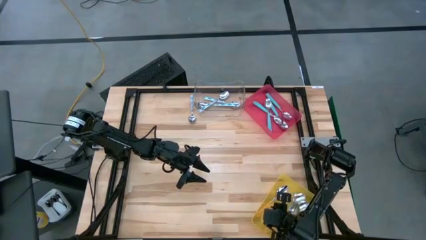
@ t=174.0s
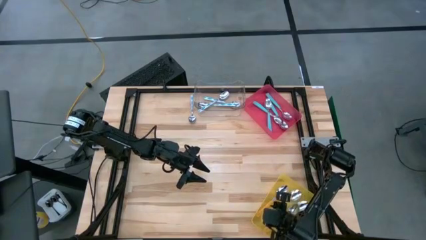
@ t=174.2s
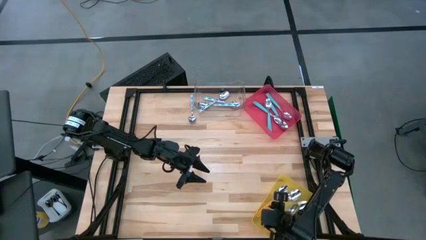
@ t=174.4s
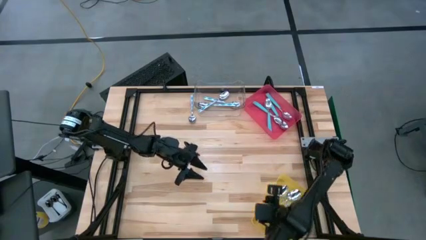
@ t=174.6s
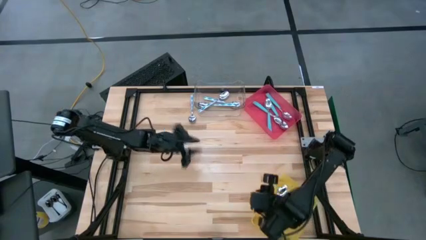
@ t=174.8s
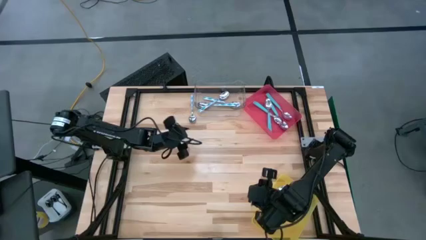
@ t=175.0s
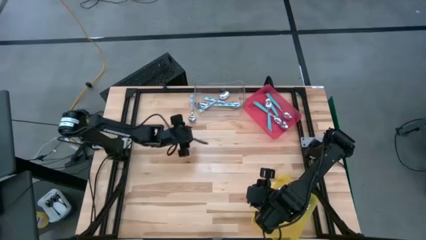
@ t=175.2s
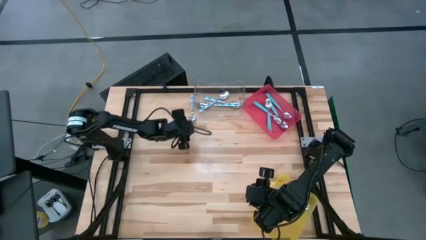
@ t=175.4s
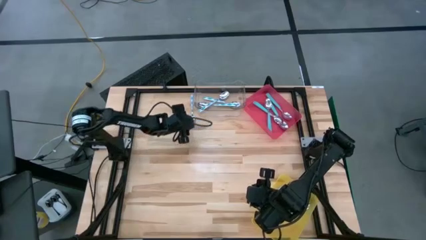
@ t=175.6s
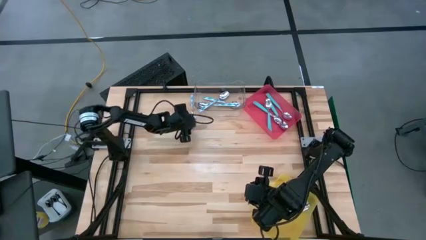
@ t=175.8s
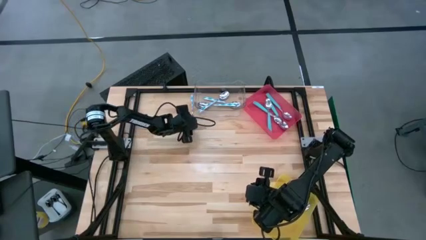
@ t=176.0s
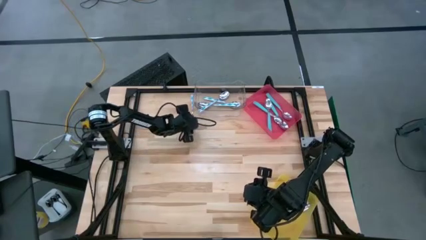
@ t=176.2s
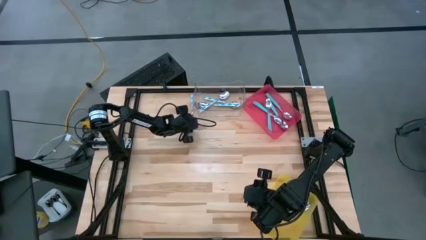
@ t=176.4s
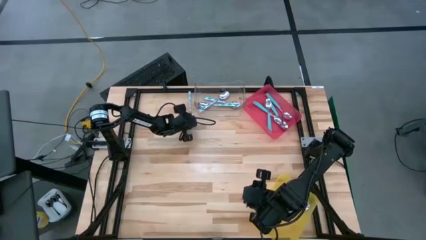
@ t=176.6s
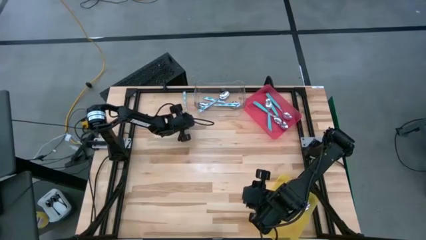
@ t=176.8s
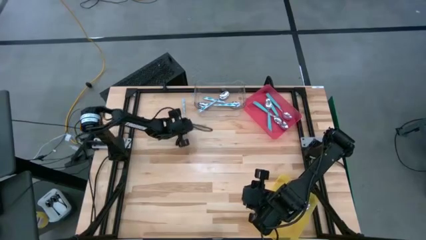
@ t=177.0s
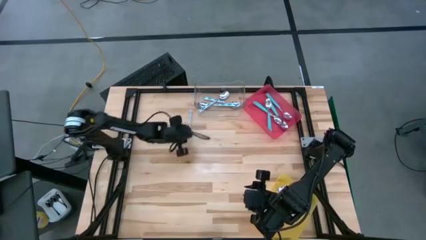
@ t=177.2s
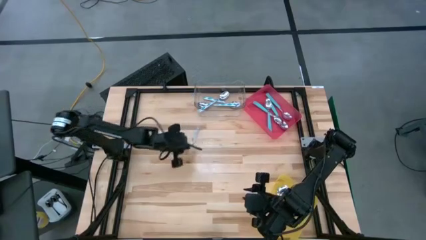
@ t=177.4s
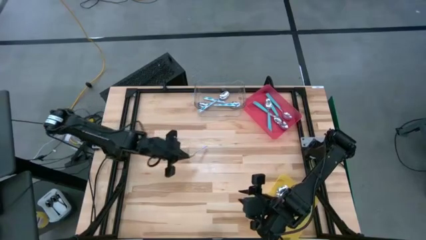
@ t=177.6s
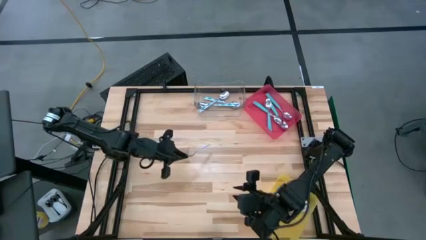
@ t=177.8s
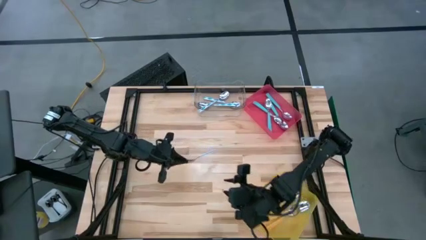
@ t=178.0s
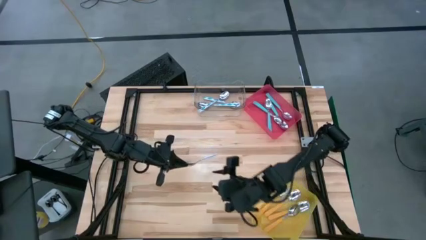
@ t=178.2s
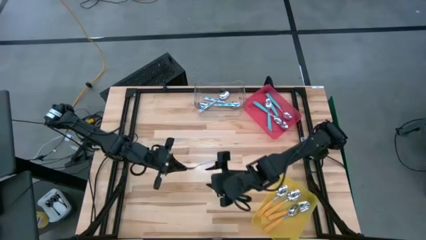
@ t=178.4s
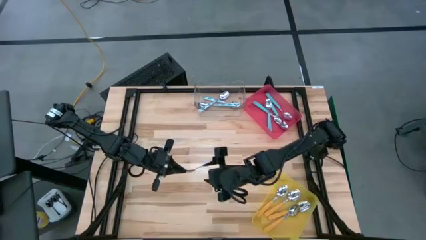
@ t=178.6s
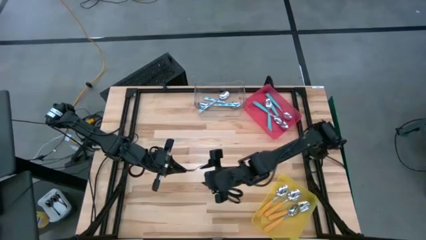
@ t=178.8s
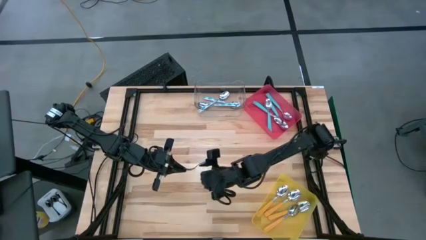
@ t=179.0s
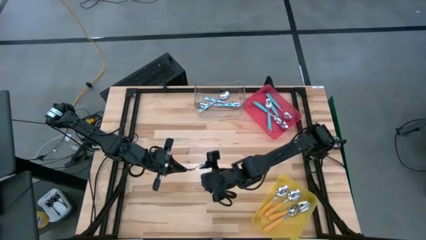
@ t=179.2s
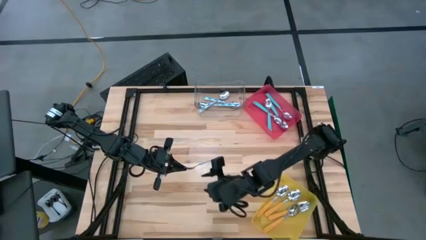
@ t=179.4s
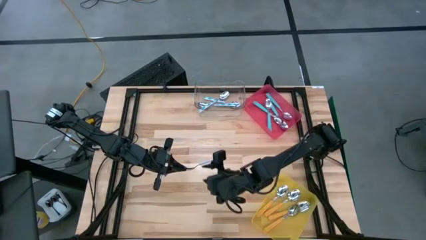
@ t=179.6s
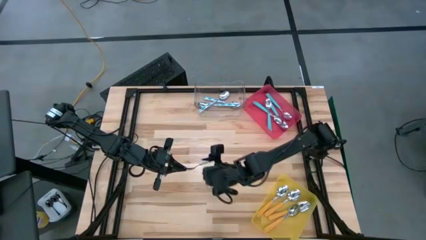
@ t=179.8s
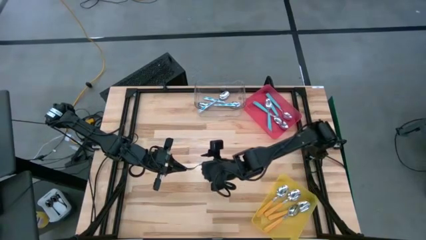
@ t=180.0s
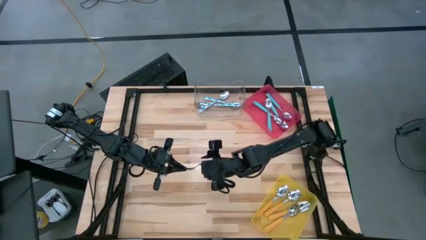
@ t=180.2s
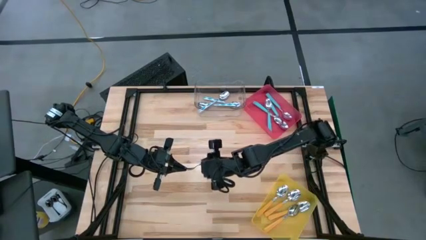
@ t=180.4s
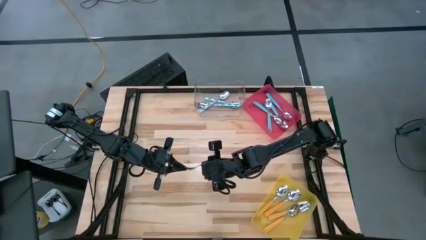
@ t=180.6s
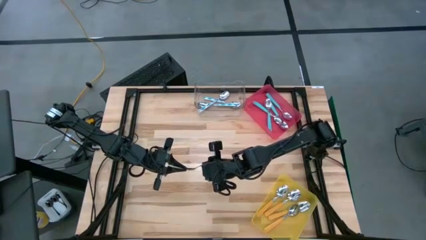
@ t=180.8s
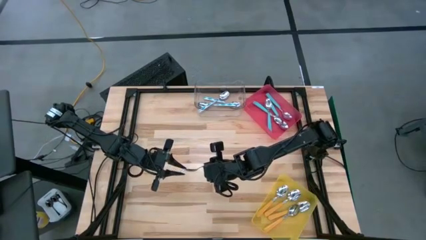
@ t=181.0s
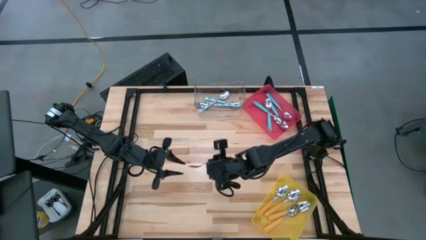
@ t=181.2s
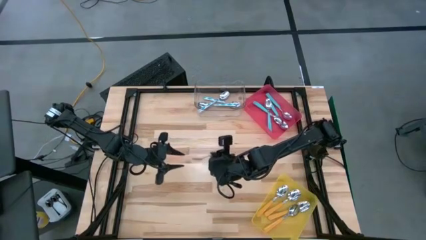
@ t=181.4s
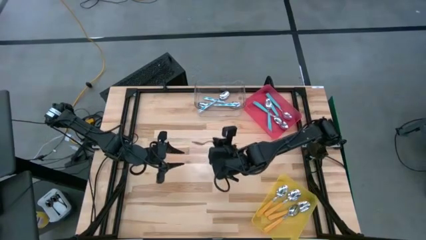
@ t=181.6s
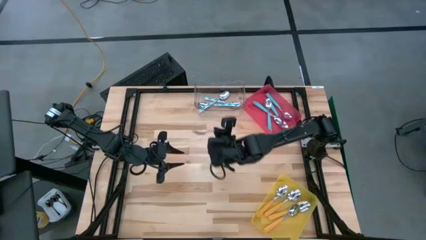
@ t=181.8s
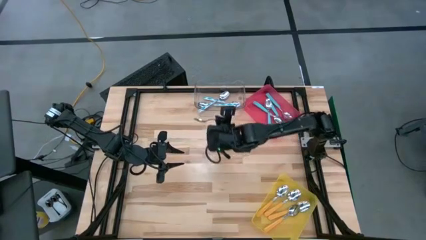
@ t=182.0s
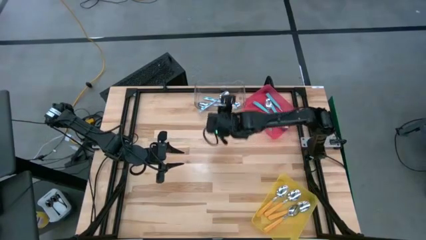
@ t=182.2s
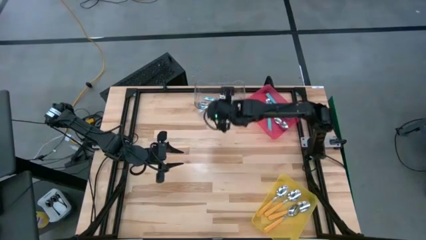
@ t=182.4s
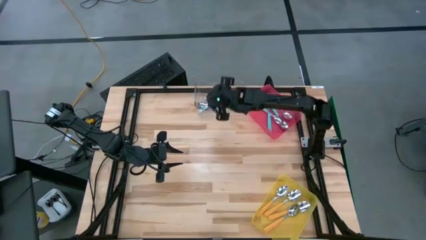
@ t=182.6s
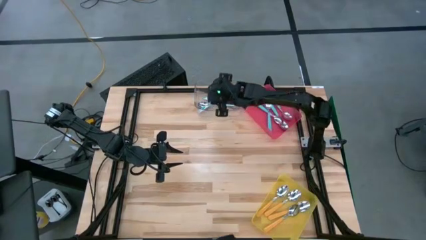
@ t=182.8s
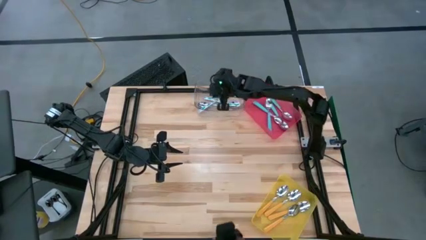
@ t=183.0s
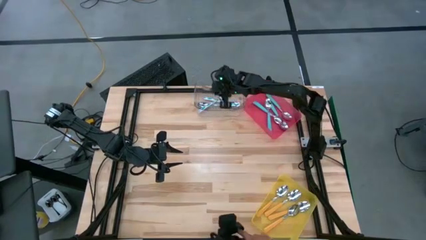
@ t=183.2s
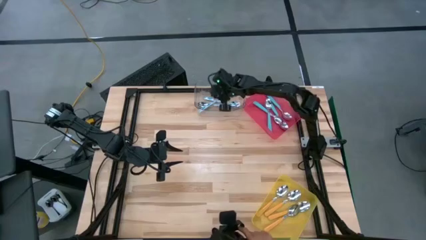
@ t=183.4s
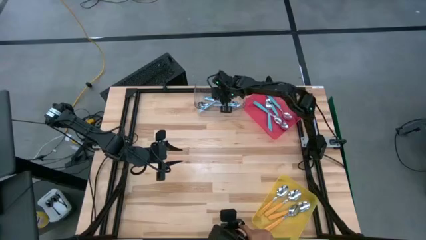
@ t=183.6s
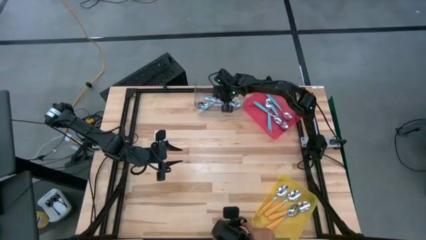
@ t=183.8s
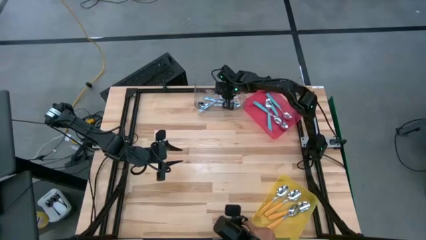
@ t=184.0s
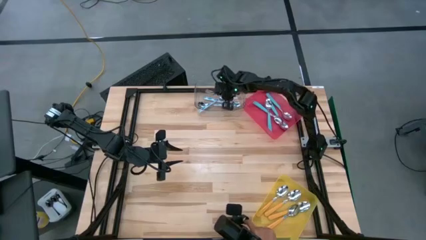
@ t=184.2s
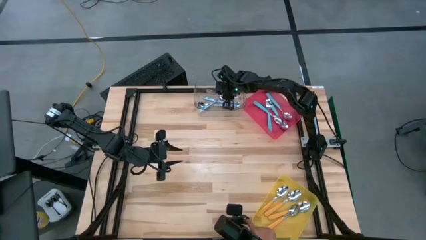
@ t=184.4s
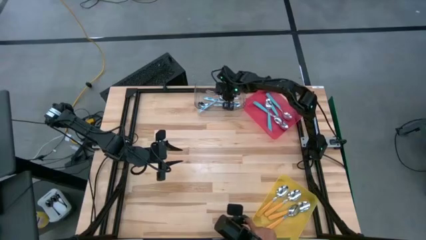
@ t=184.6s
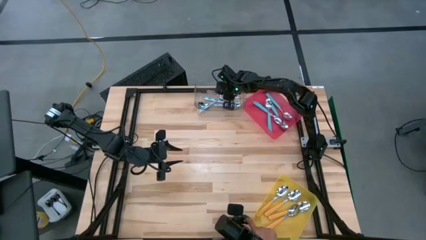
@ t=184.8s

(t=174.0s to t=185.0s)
Task: Sort silverware by color (type)
Put the white-blue spoon into the transparent bin
